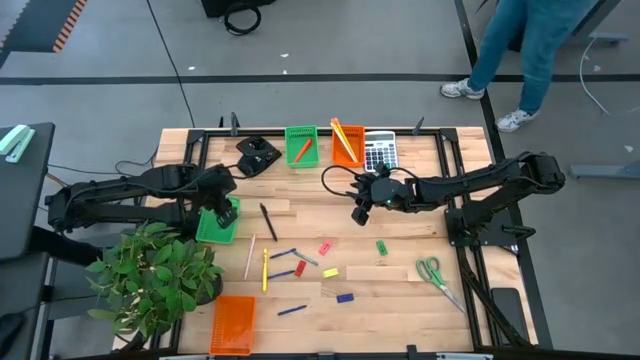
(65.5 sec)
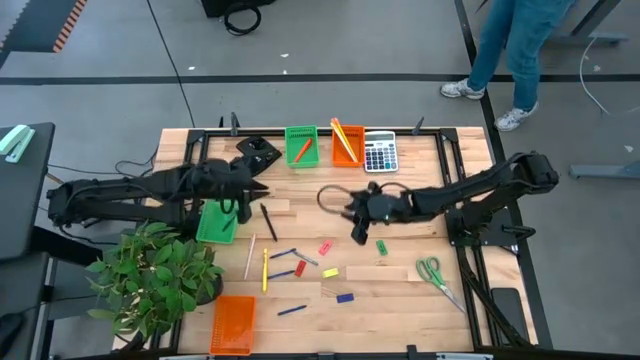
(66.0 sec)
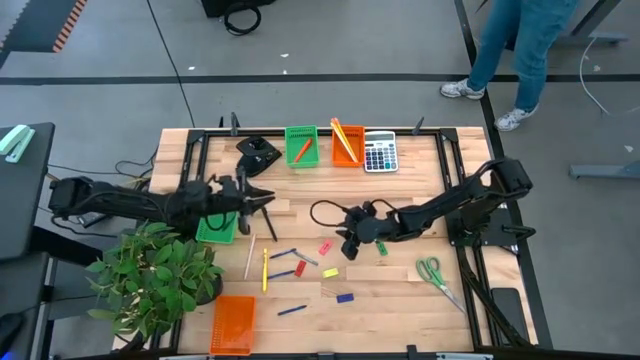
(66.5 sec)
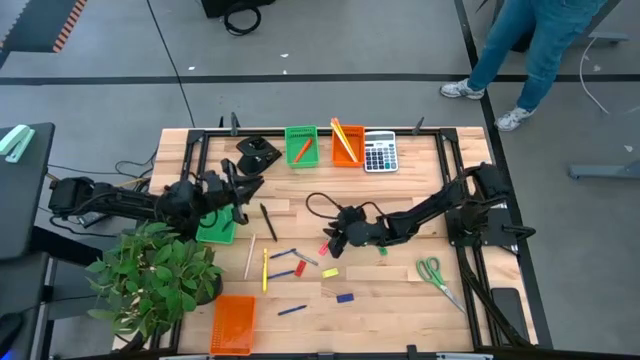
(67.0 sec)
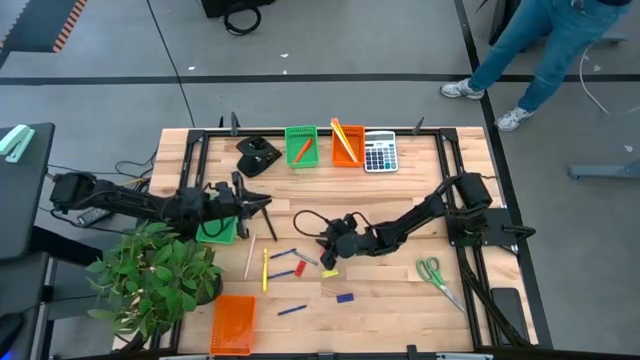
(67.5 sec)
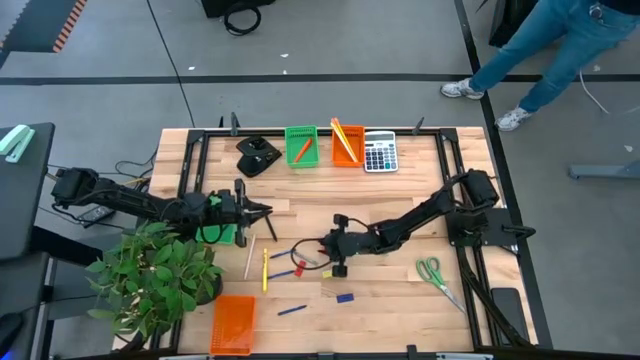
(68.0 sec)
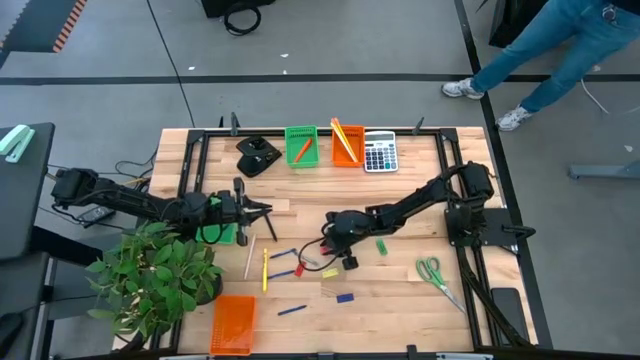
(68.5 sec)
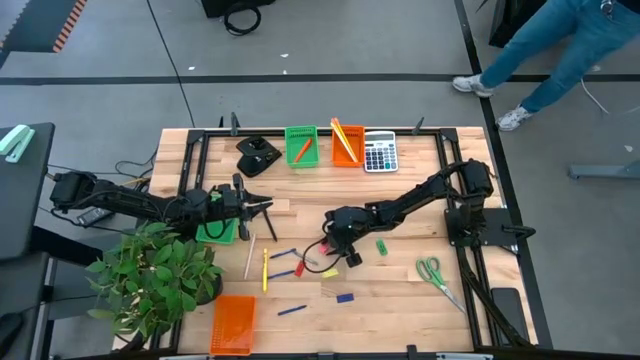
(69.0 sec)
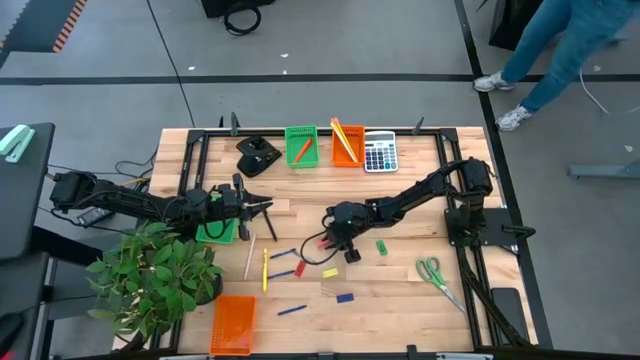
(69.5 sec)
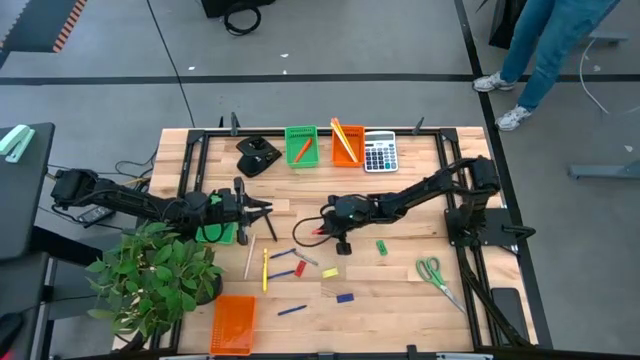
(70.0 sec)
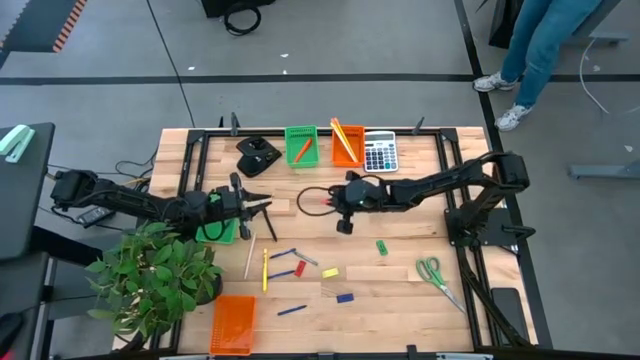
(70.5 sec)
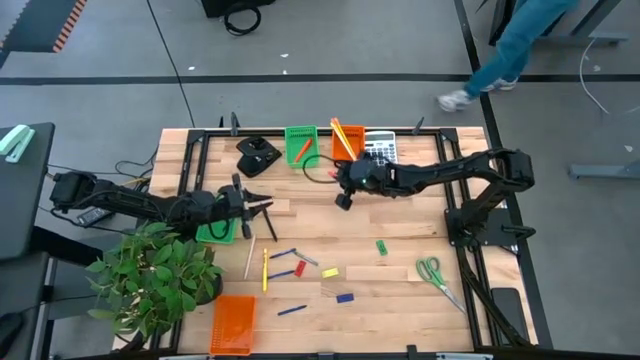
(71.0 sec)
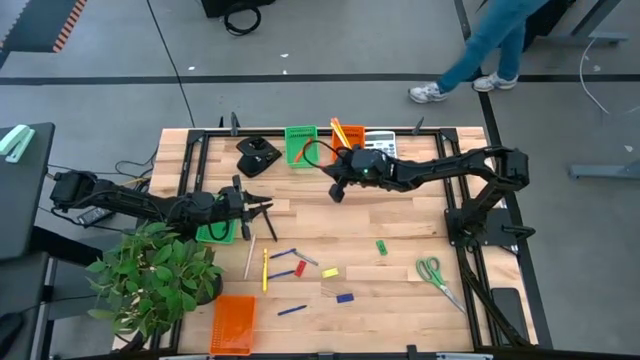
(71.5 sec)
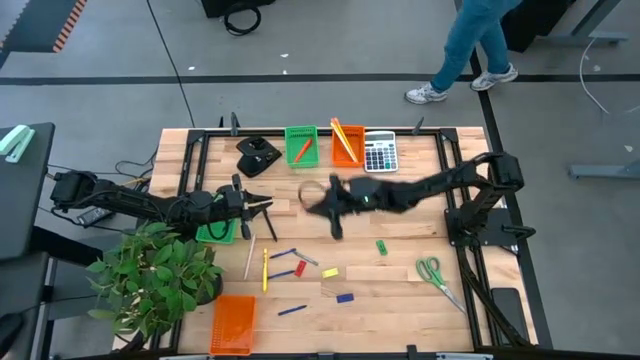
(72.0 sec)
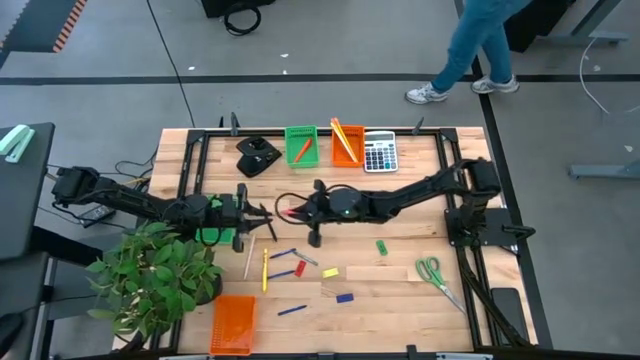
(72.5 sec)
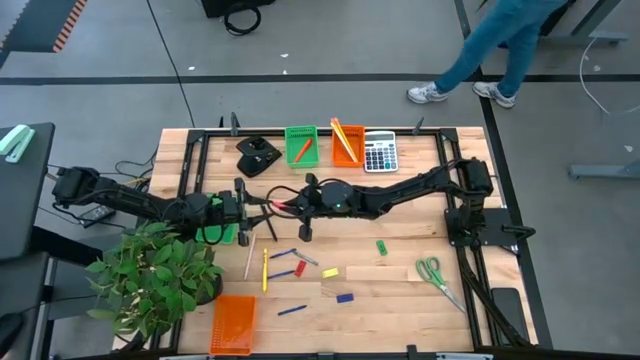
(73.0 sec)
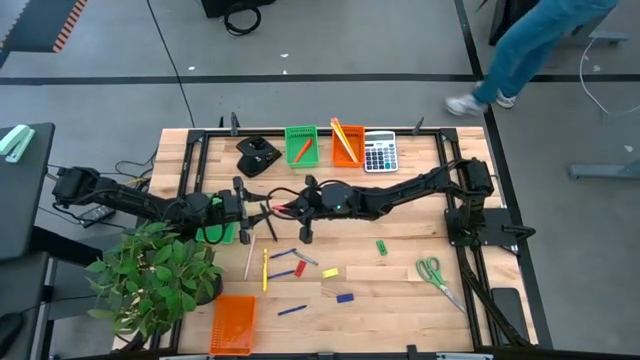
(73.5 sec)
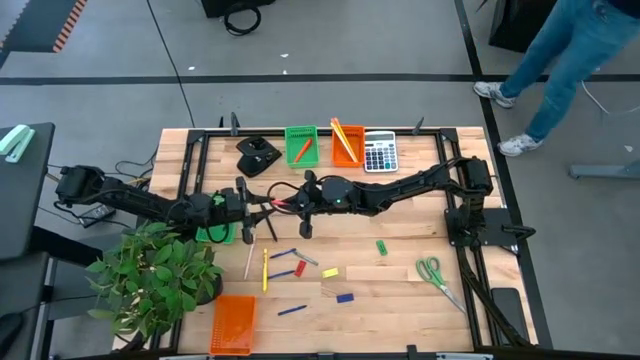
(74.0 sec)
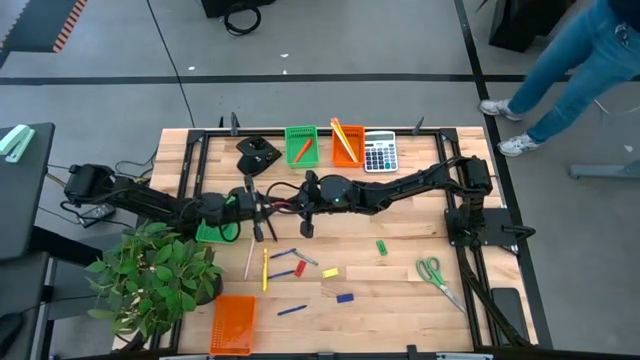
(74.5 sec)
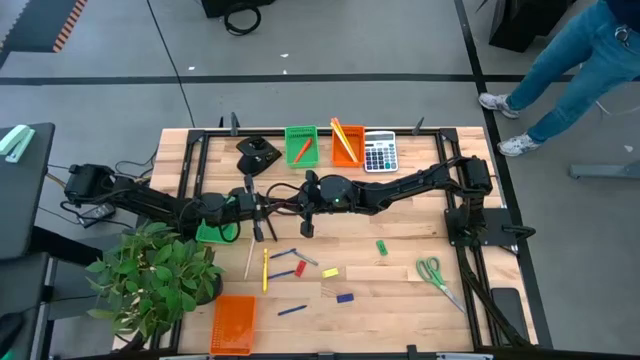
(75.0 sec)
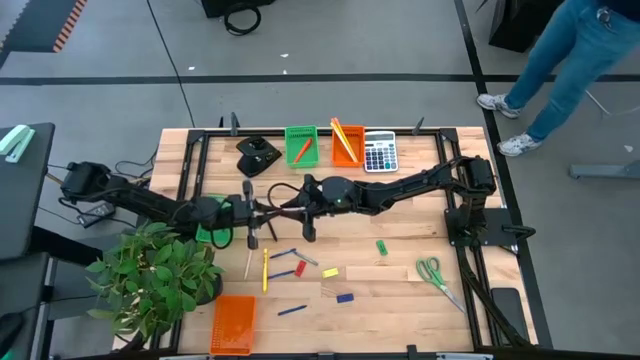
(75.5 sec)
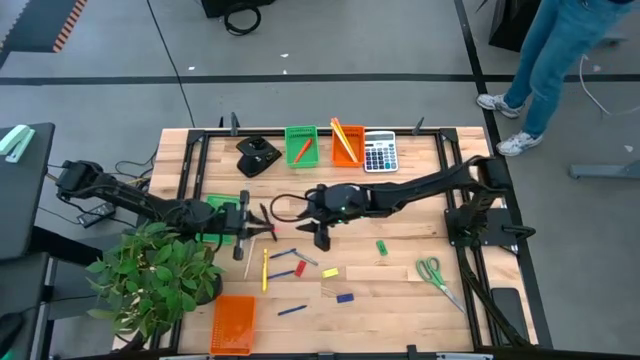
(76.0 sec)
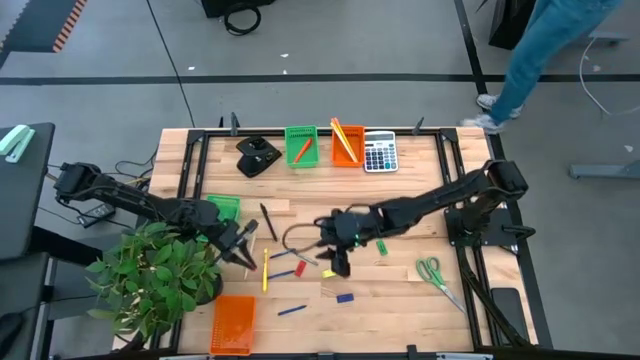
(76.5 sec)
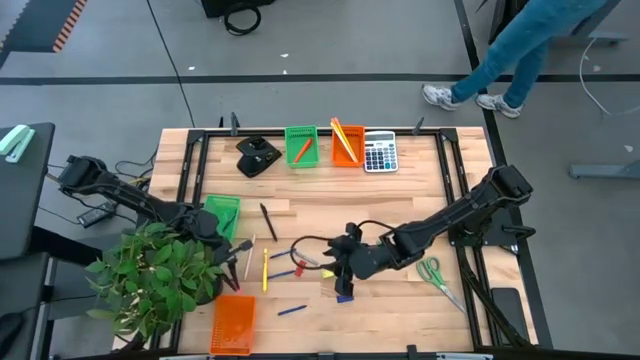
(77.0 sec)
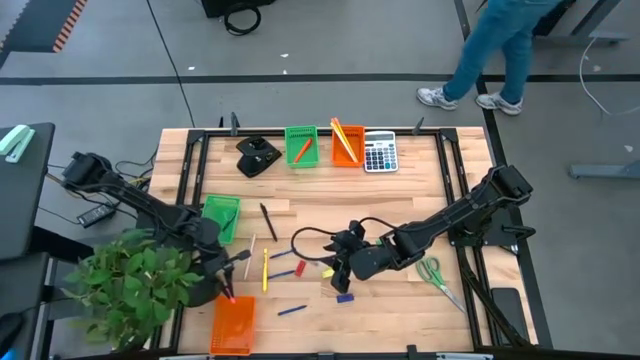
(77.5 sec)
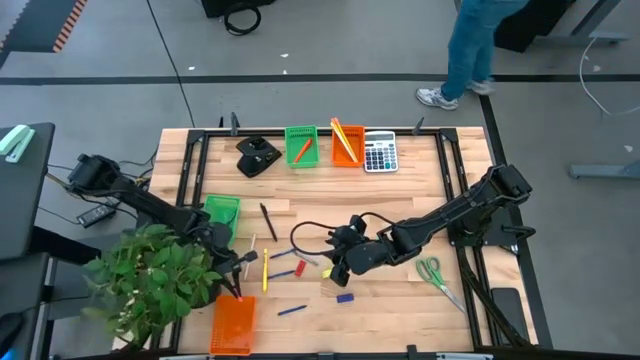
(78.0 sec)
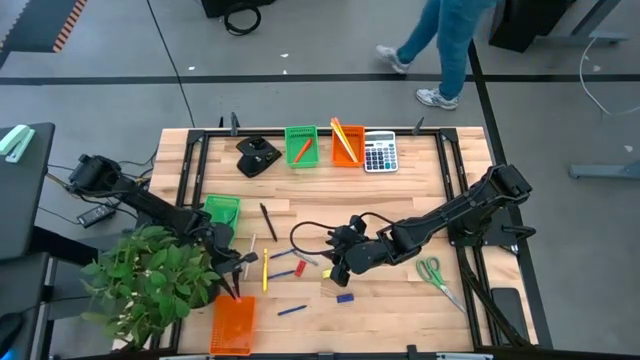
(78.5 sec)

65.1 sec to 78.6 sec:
Task: Sort crayons/erasers/pens/pencils in bins
Put the pink eraser into the bottom orange bin

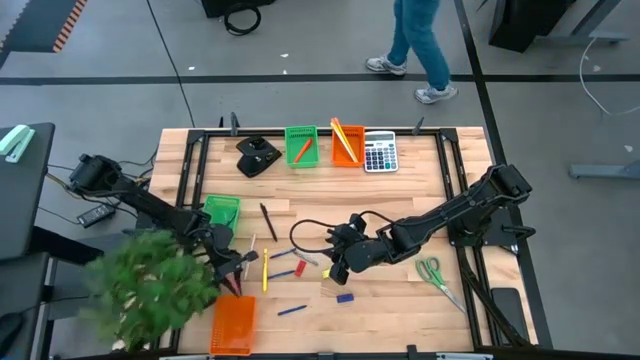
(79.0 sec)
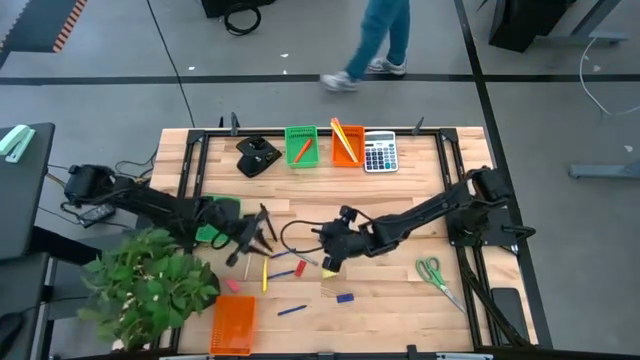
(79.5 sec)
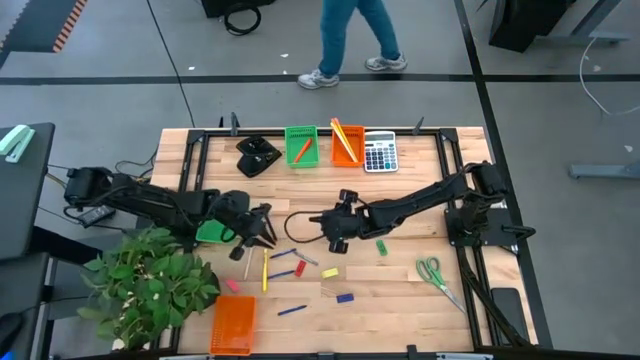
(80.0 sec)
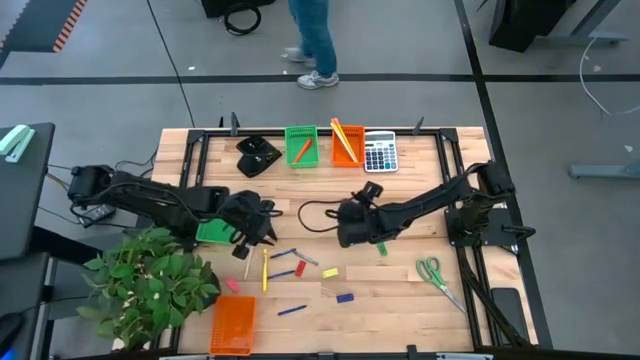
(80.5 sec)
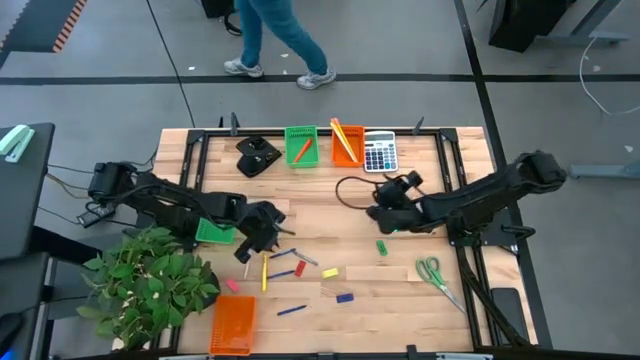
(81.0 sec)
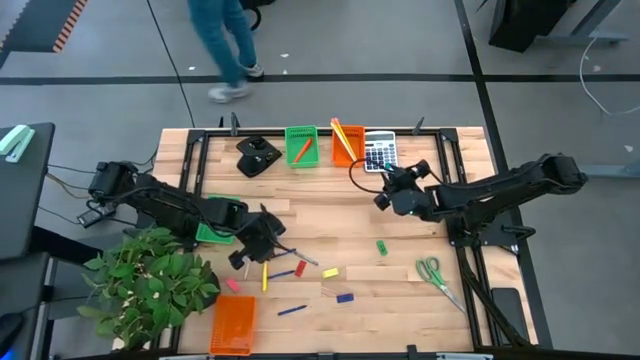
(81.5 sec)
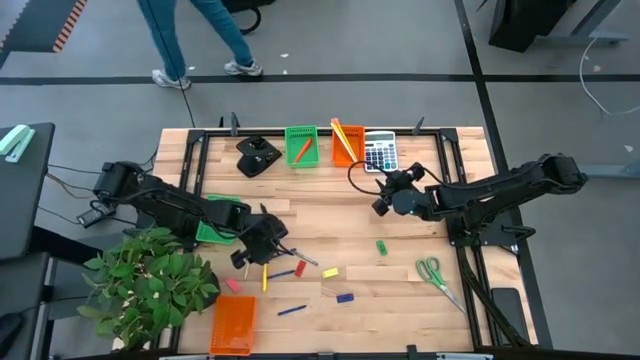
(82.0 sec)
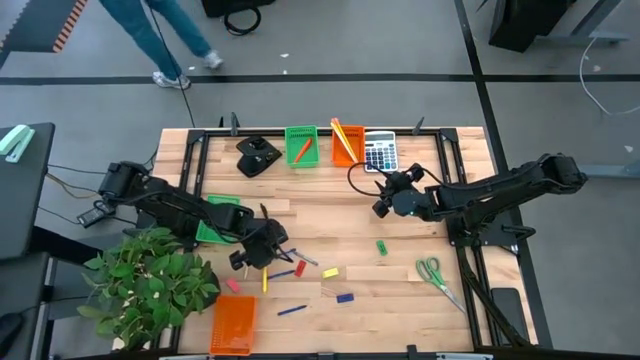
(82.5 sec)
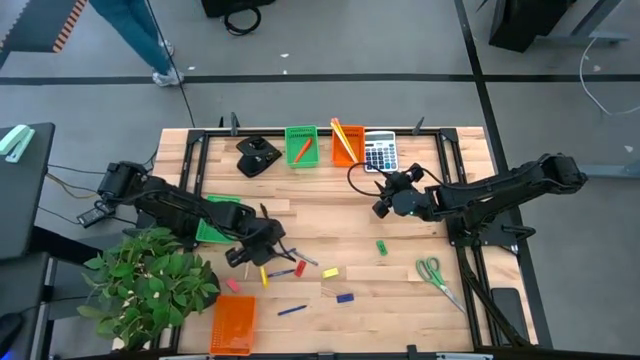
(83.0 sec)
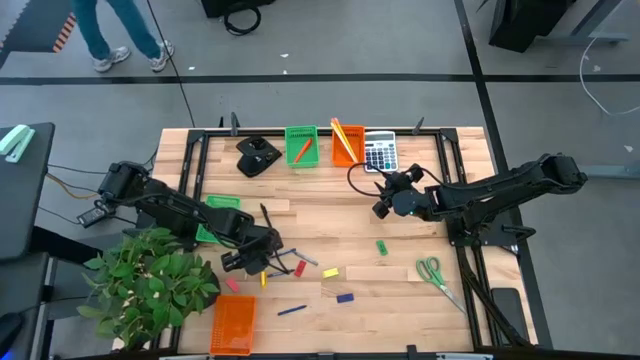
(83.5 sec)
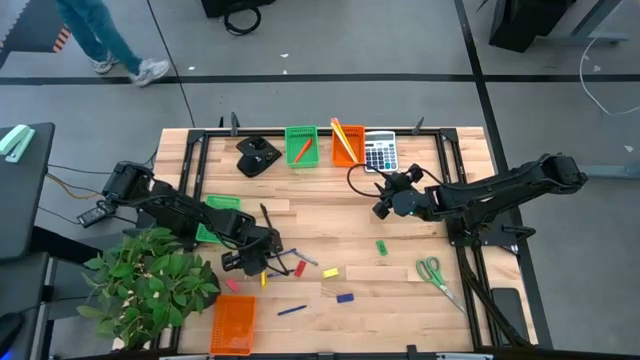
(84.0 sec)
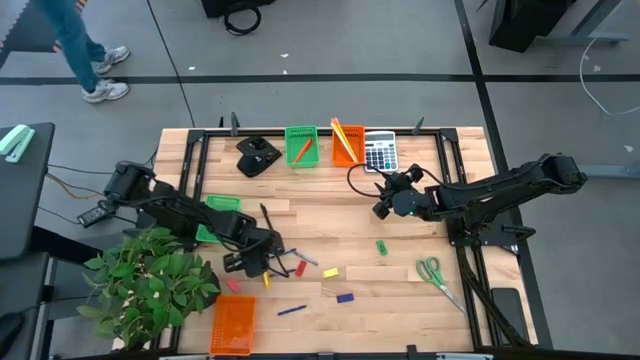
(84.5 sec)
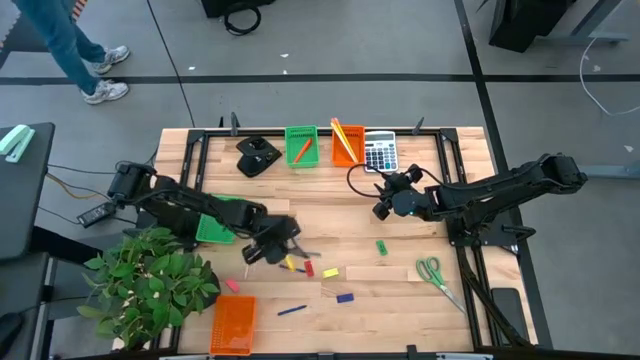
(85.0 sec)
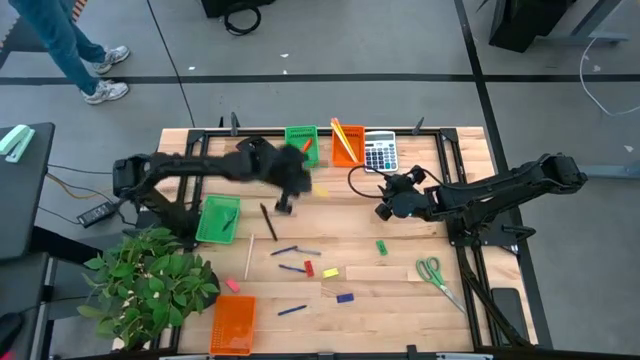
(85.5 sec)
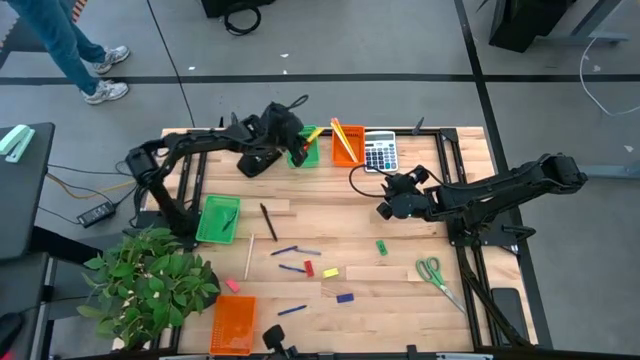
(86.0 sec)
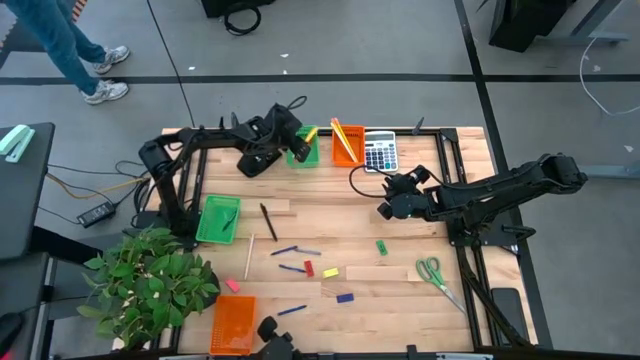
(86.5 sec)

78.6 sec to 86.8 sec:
Put the yellow pen into the top green bin

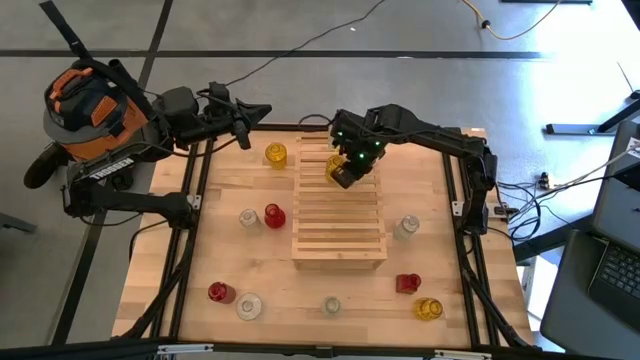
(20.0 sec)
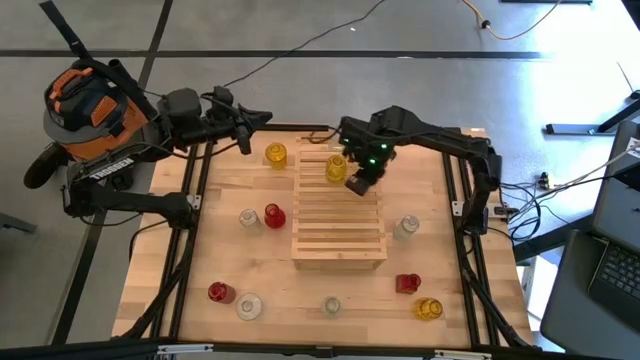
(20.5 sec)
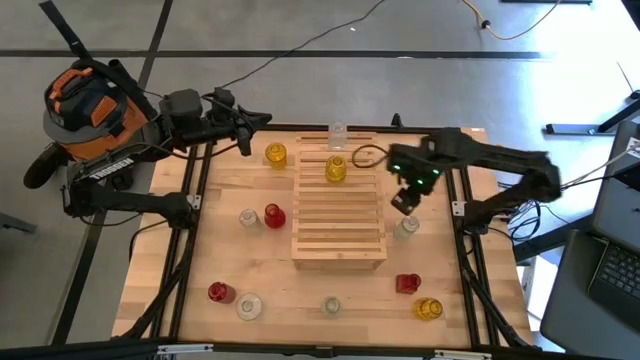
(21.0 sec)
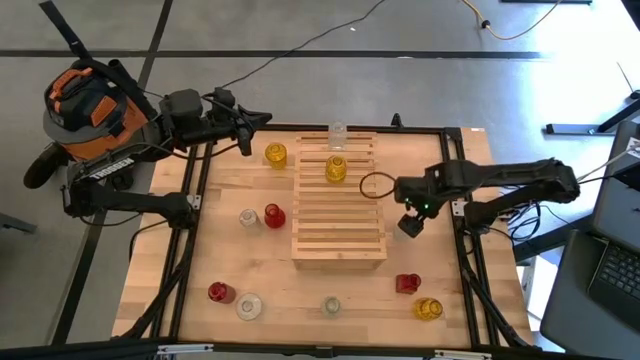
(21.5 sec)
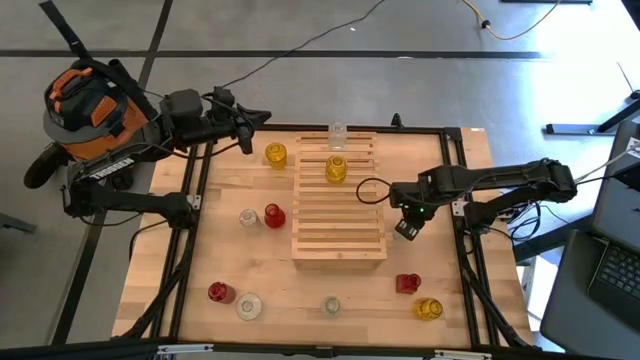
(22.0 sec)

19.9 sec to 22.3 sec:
Task: sort vases onto shelf
Align the transparent vase with the transparent vase on the shelf
